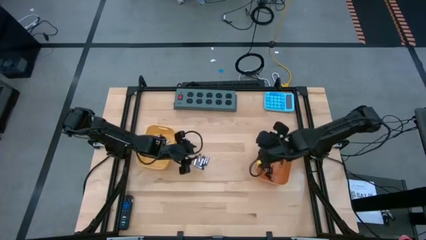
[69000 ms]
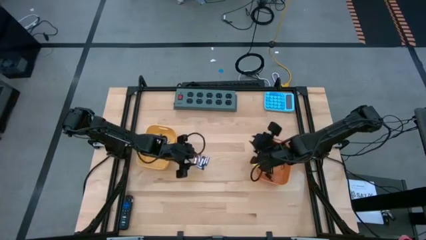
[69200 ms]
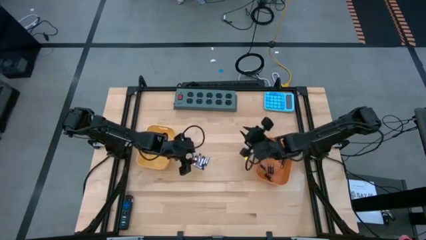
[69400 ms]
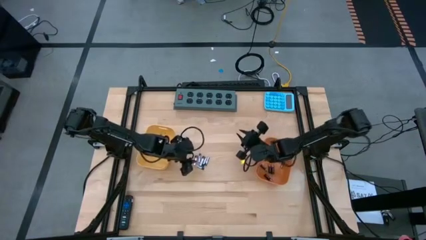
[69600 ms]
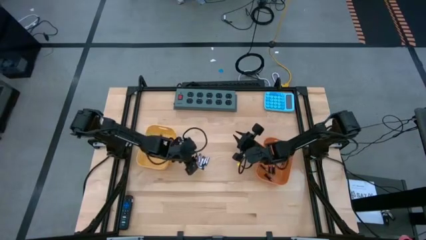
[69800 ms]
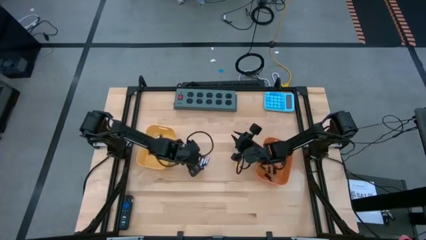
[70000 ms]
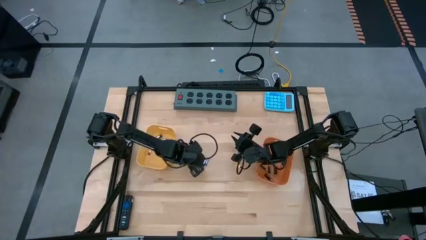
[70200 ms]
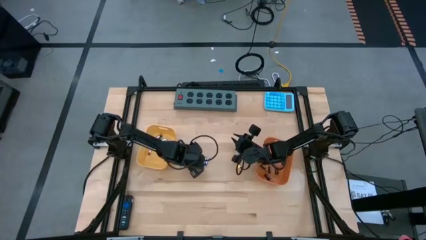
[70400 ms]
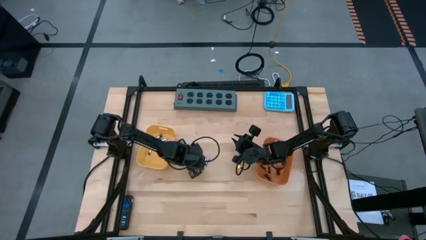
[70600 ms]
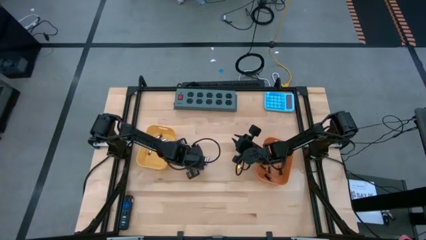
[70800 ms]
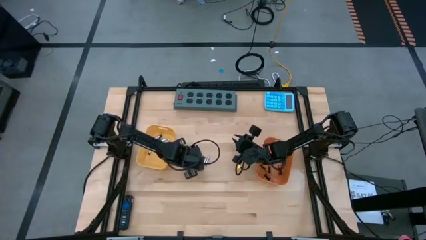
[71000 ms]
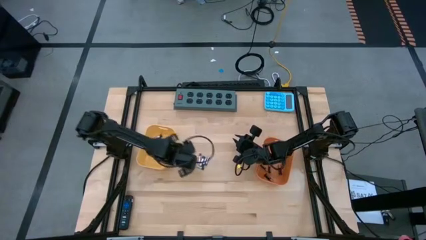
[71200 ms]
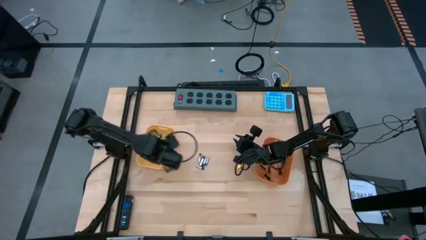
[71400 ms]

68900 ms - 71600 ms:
Task: Sort batteries
Put the silver battery into the yellow bin

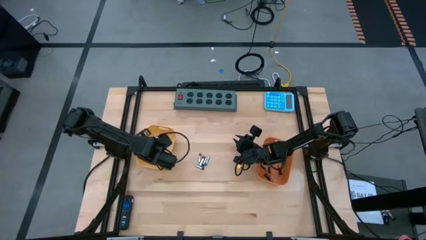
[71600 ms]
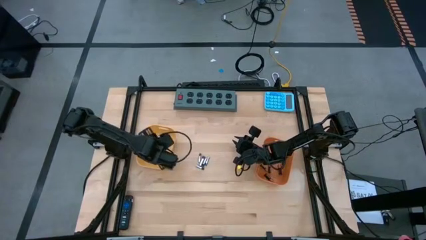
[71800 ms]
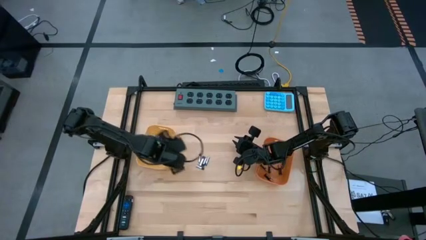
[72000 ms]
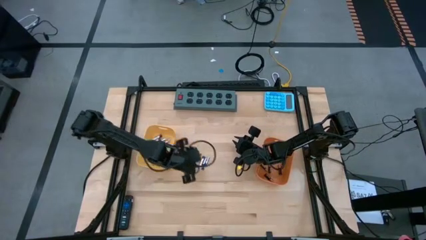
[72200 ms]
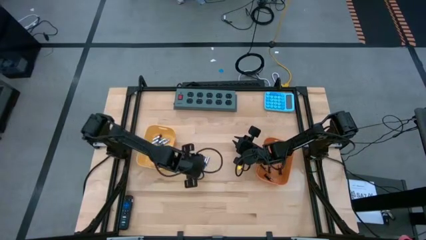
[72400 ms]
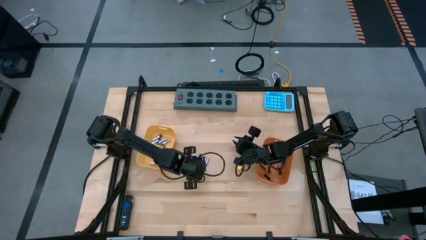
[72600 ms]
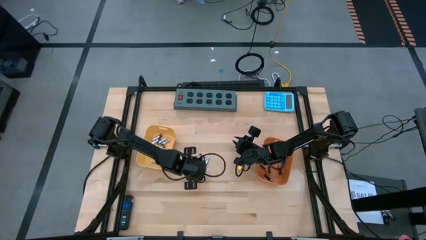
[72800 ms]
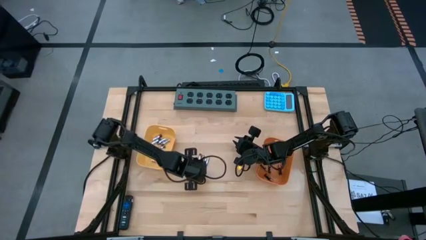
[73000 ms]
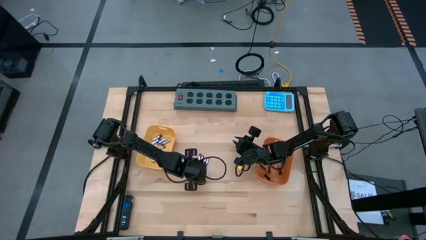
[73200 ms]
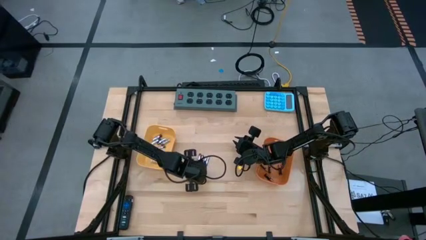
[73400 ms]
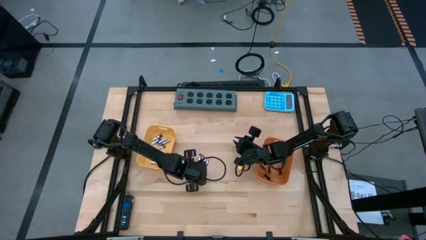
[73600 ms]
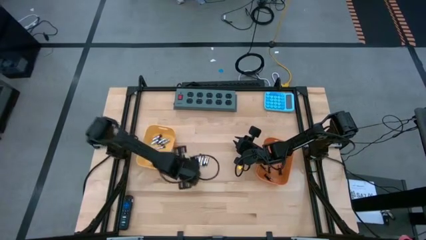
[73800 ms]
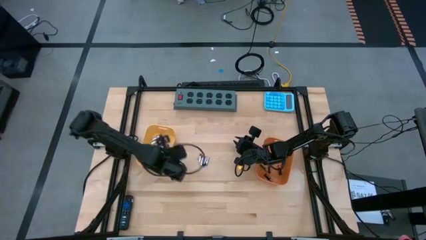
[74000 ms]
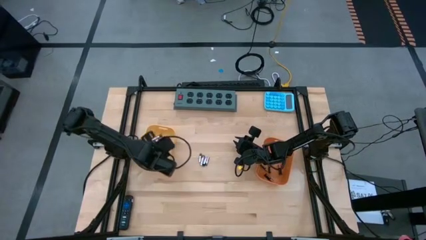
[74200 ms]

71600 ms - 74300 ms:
Put the silver battery into the yellow bin

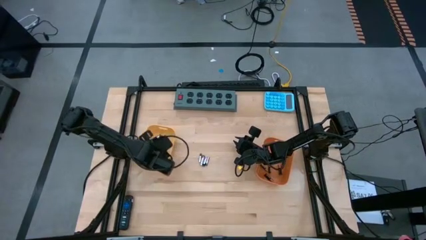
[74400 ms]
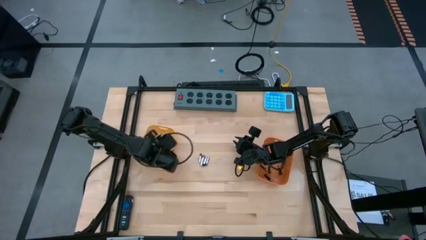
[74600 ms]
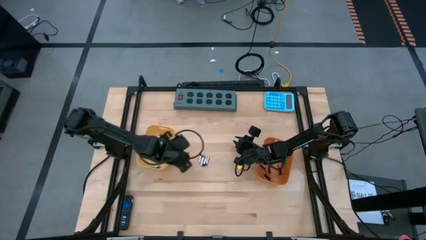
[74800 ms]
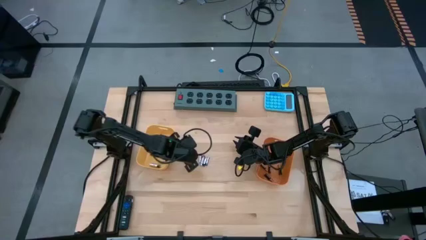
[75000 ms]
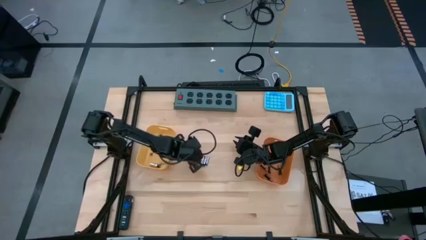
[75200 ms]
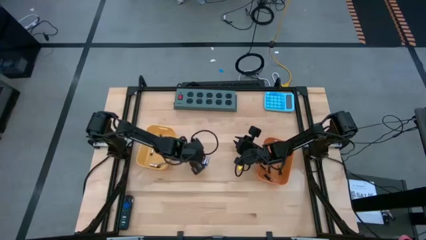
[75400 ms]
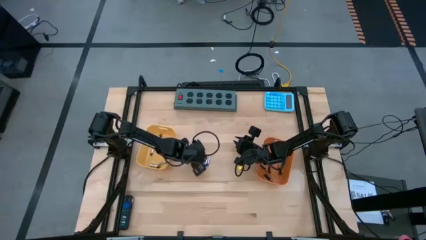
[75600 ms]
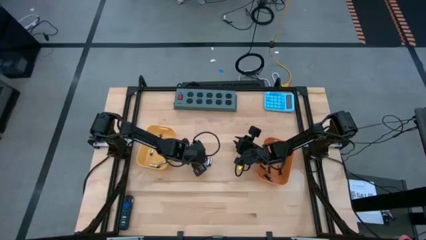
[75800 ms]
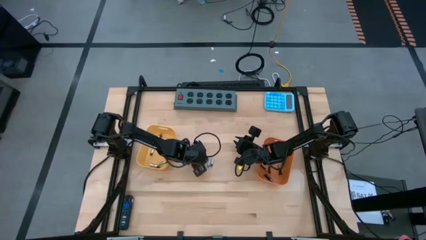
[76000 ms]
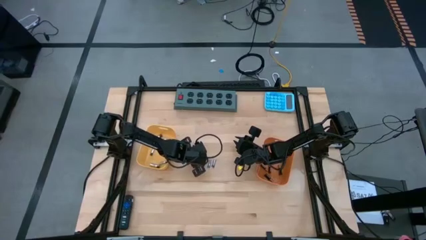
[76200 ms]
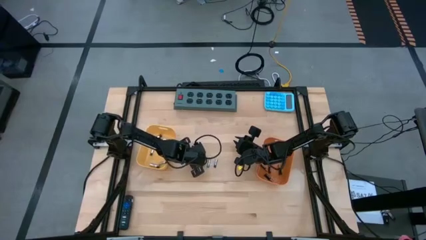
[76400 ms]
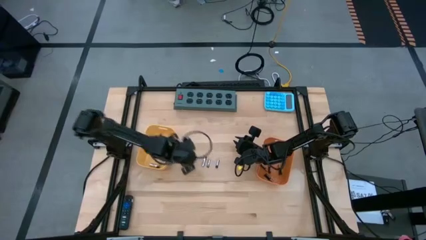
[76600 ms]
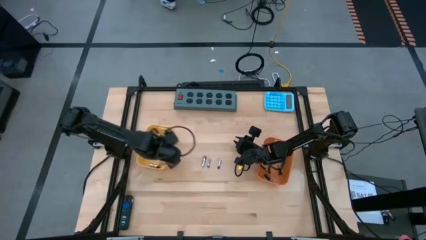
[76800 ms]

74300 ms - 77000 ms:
Put the silver battery into the yellow bin

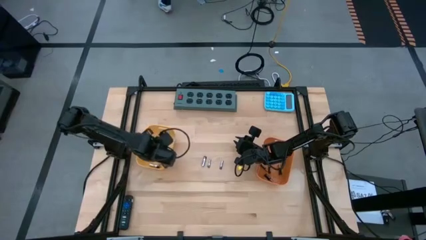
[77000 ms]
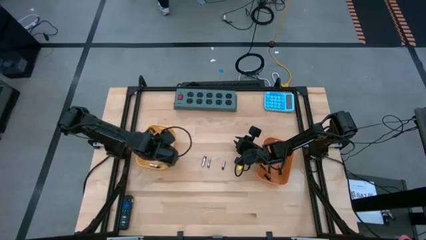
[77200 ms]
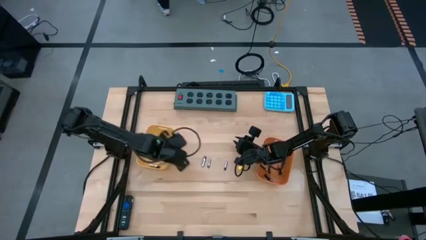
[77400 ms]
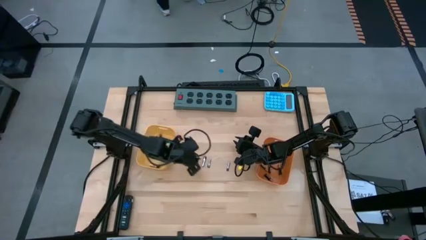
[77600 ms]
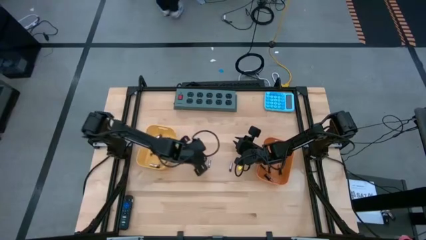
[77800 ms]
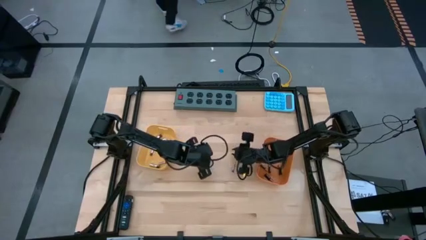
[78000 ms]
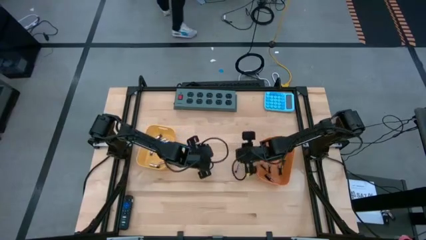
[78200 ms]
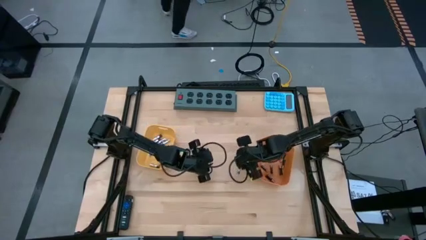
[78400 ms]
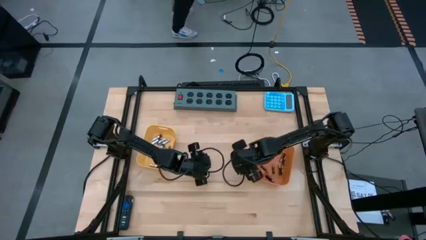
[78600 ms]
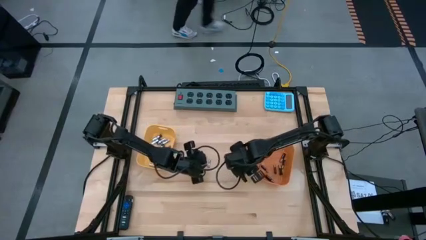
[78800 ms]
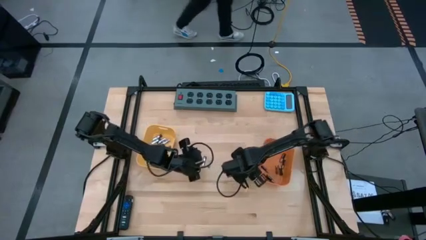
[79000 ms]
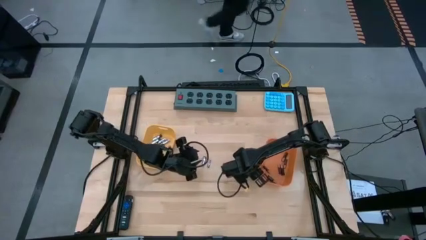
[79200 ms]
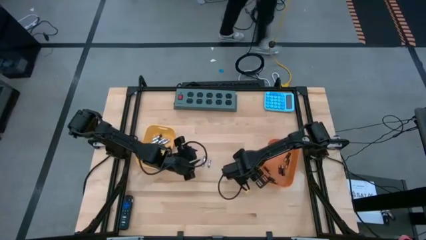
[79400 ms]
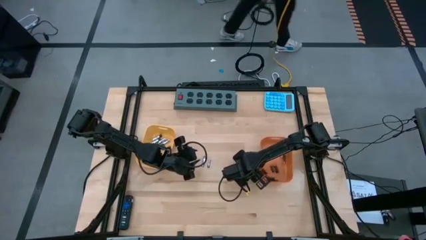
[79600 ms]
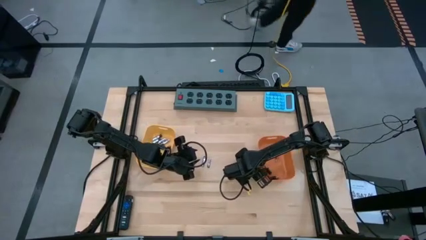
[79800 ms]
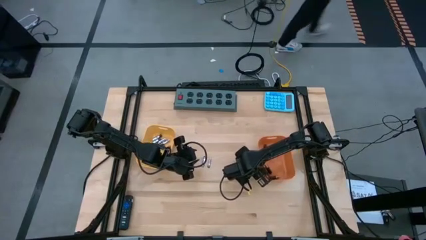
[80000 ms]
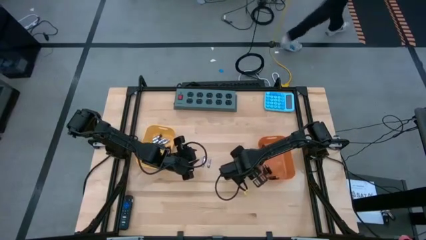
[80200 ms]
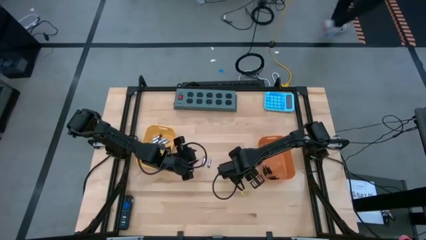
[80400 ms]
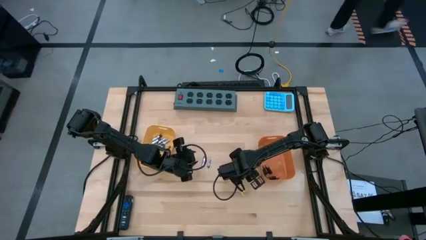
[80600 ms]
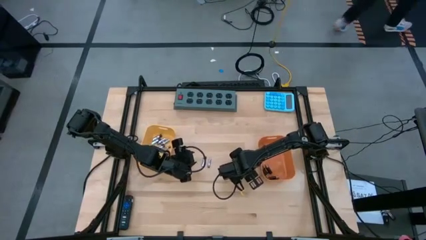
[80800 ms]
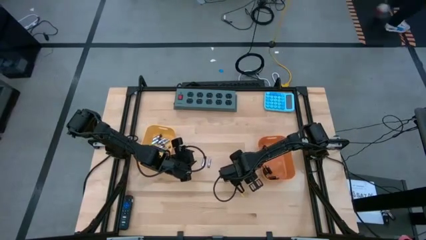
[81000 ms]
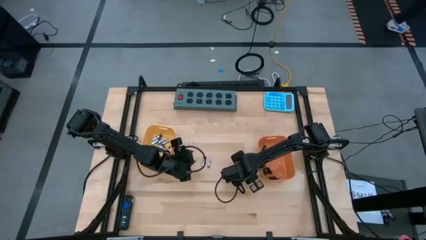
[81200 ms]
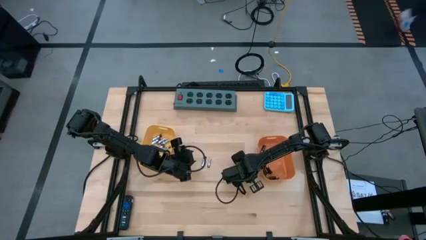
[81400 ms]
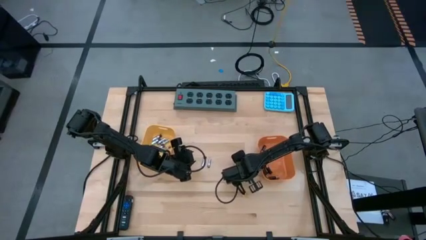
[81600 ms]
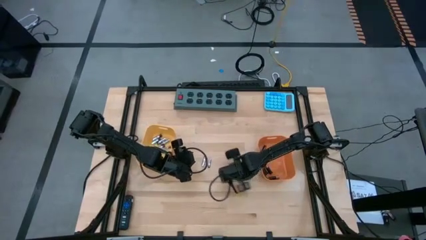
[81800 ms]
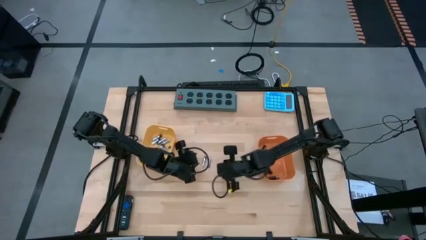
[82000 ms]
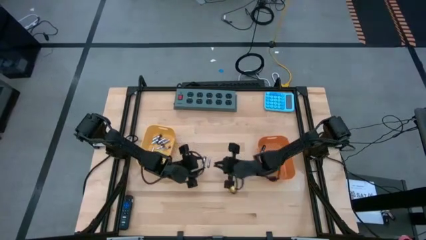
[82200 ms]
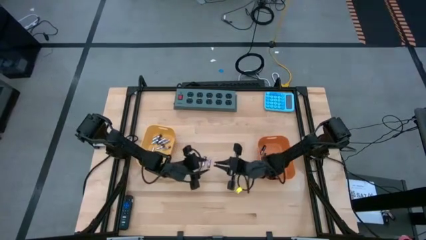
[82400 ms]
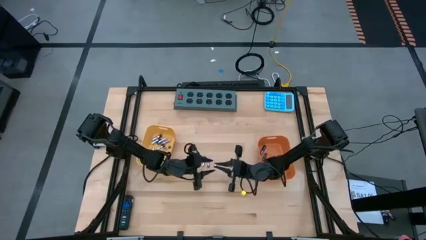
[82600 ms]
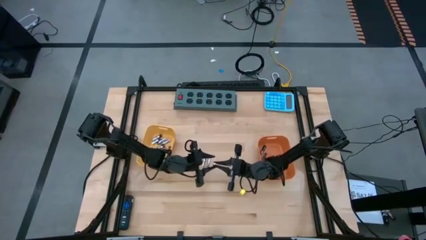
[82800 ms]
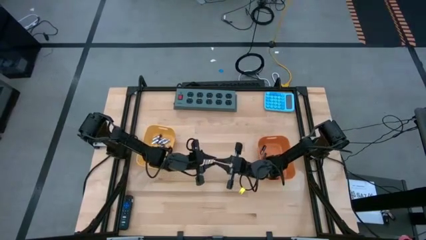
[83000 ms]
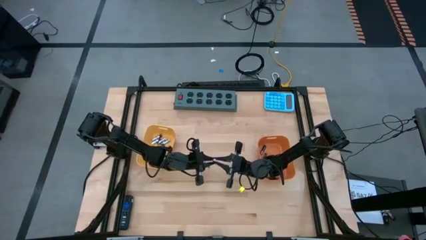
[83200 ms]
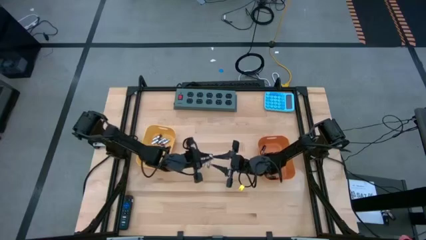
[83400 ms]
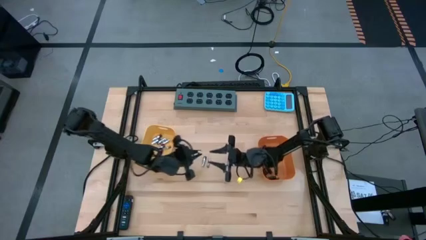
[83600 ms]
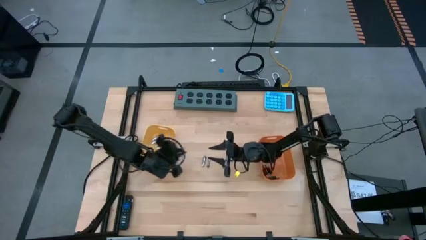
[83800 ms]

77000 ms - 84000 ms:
Put the silver battery into the yellow bin

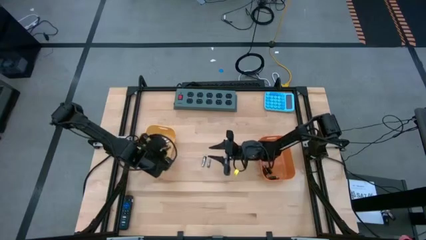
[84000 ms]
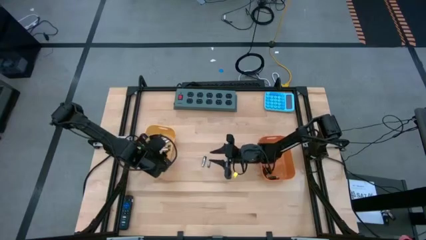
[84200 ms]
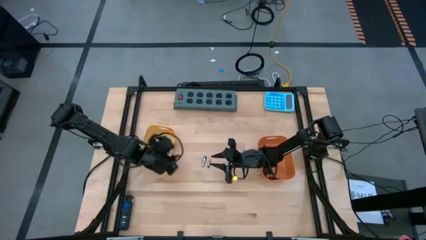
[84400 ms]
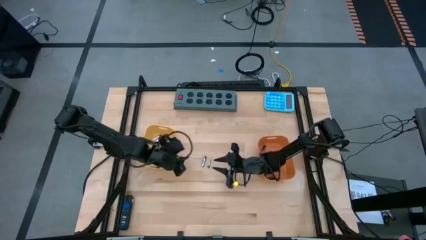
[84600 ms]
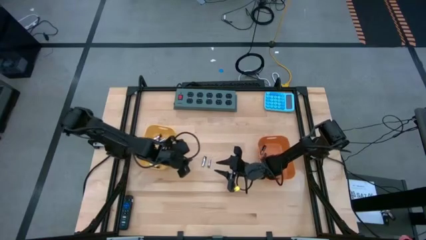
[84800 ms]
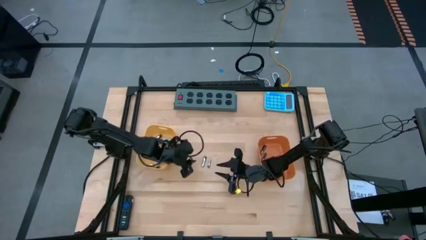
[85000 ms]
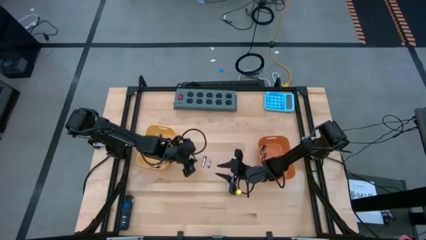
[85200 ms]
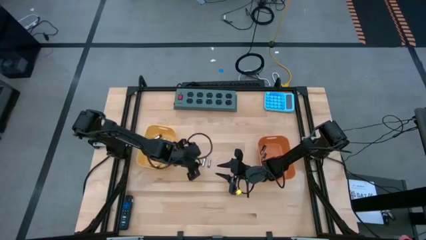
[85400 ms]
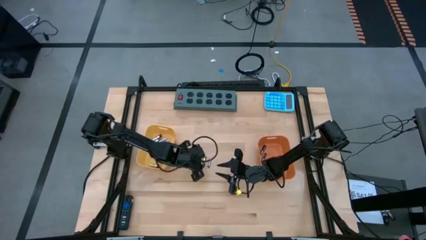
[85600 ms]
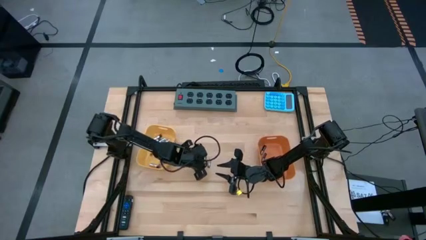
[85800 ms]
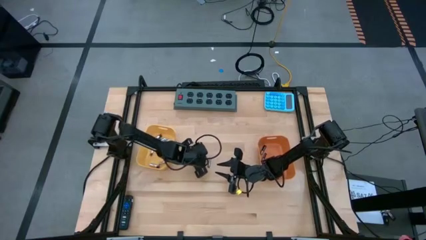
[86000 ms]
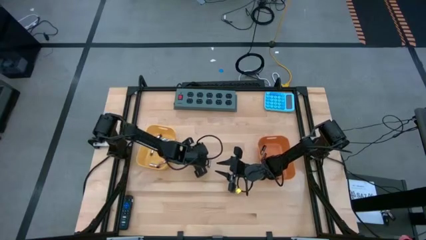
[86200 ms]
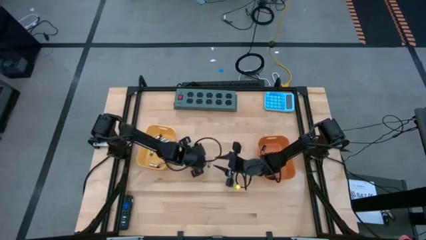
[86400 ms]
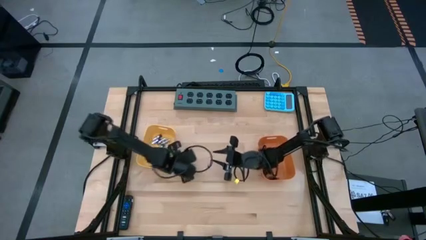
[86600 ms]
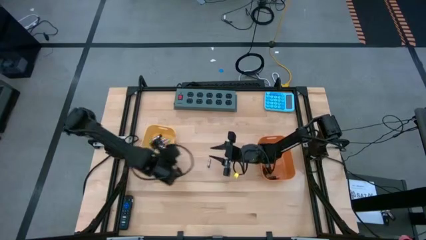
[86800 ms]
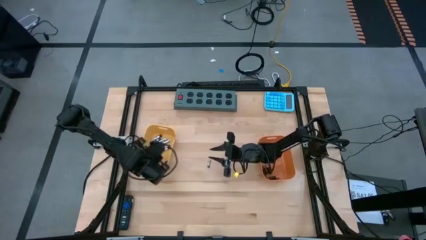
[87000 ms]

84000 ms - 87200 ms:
Put the silver battery into the yellow bin
